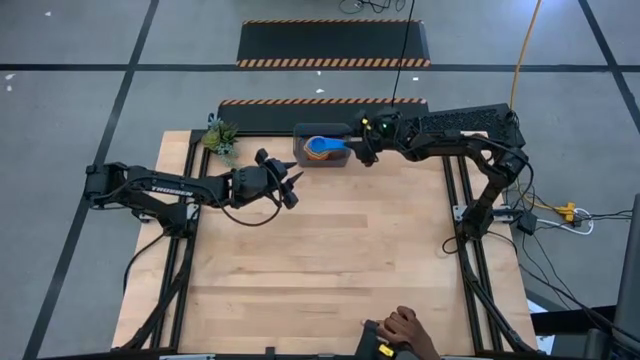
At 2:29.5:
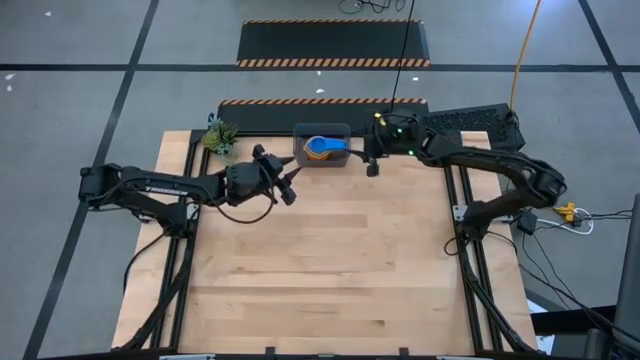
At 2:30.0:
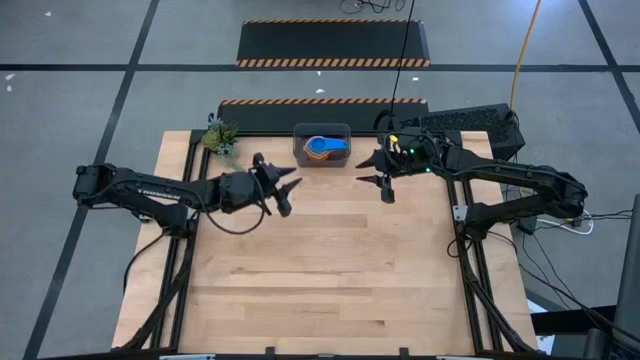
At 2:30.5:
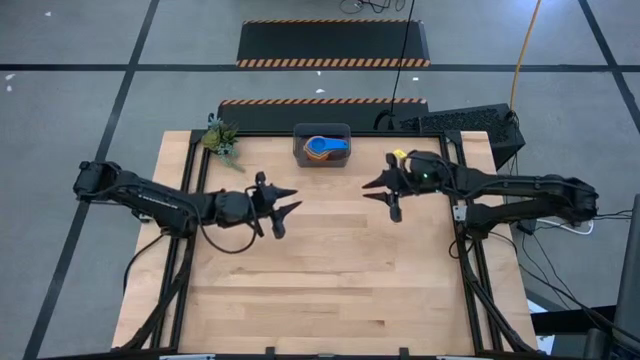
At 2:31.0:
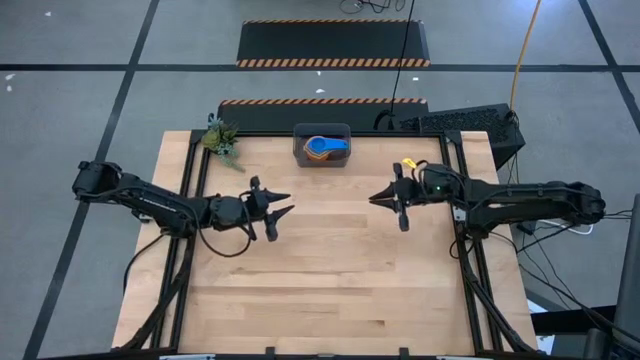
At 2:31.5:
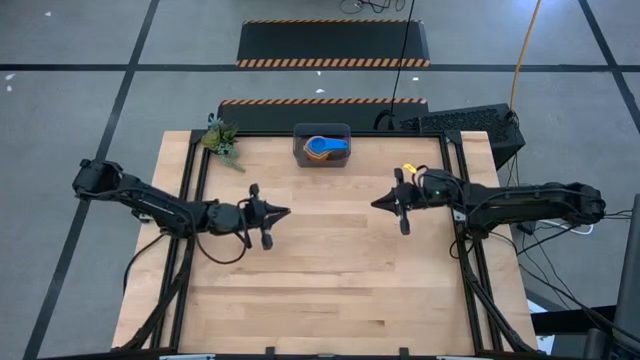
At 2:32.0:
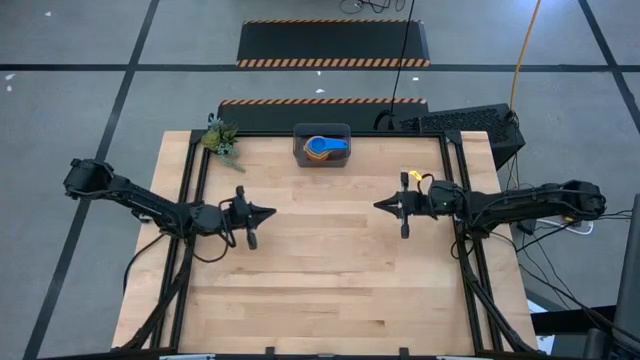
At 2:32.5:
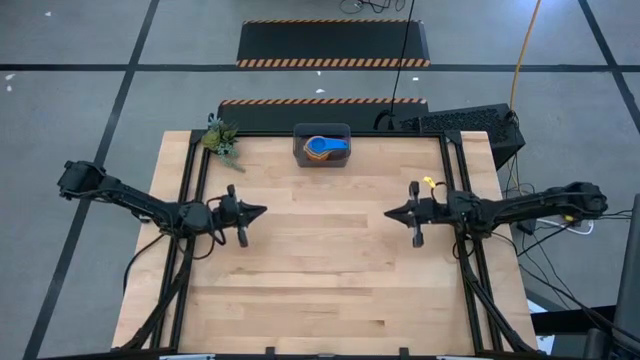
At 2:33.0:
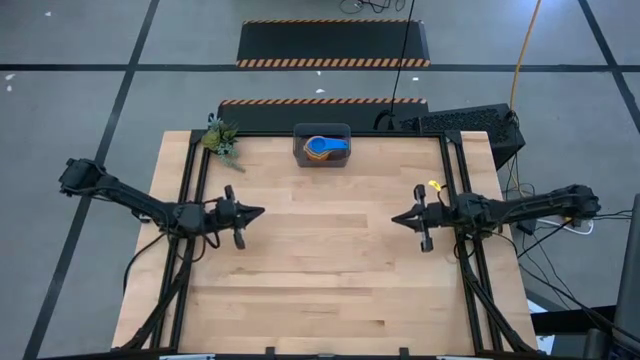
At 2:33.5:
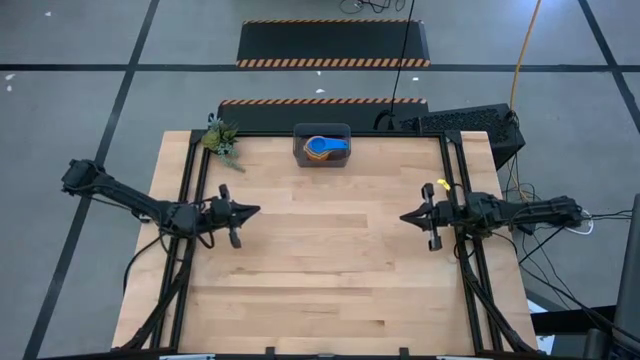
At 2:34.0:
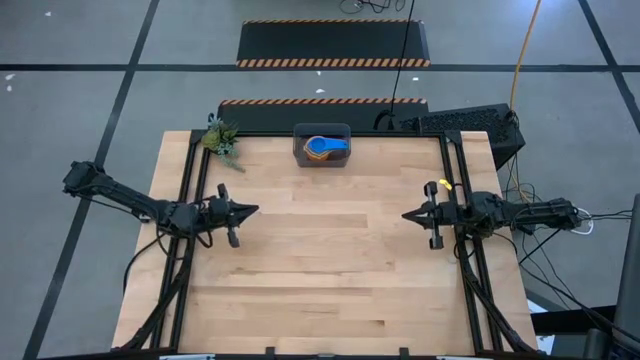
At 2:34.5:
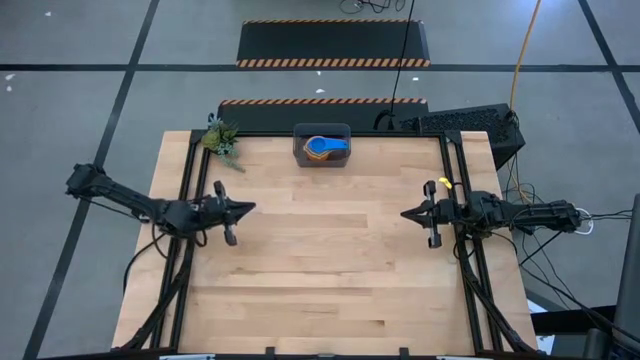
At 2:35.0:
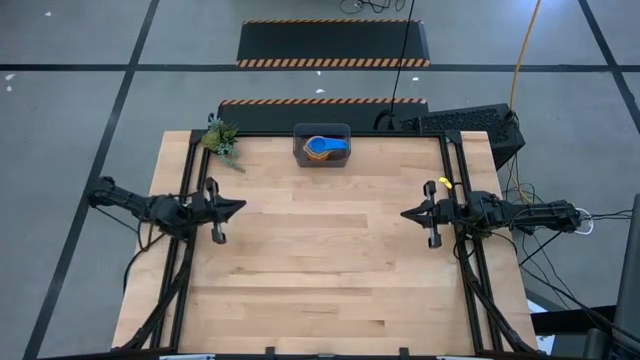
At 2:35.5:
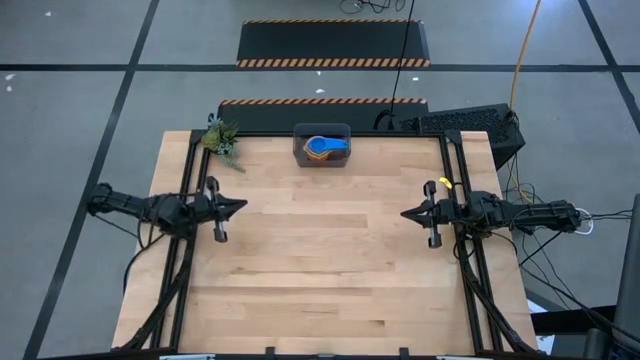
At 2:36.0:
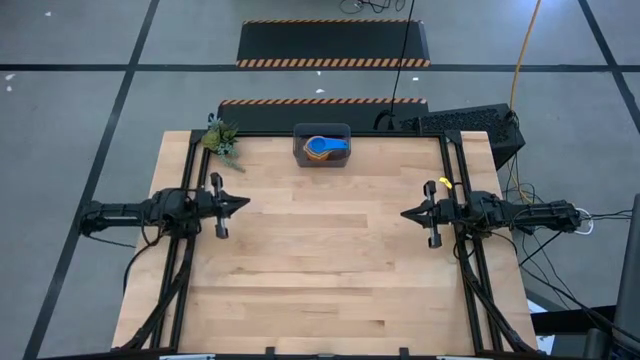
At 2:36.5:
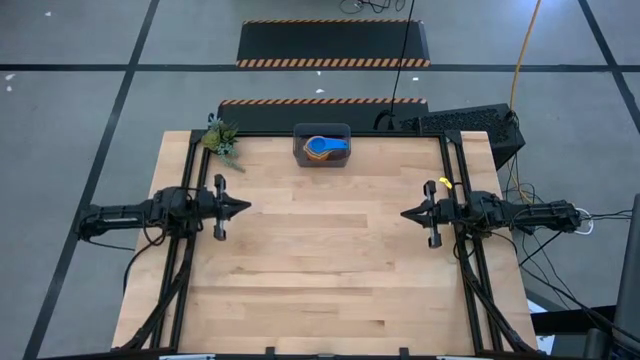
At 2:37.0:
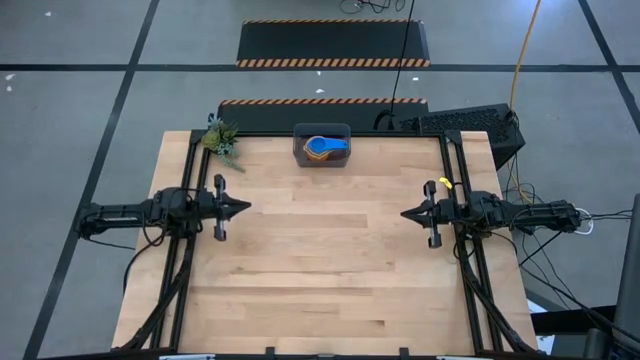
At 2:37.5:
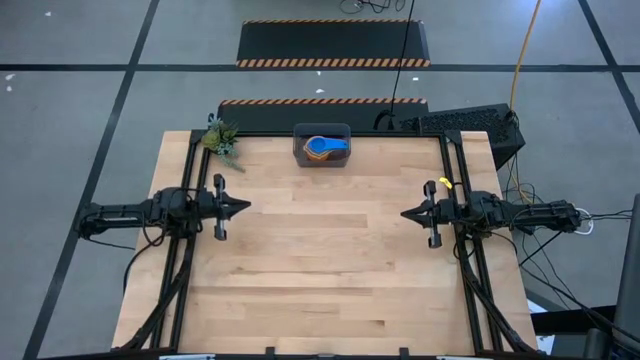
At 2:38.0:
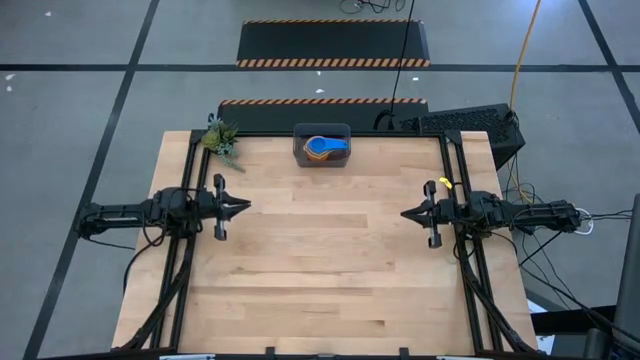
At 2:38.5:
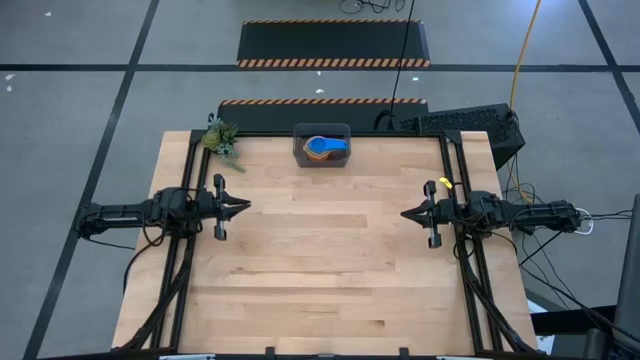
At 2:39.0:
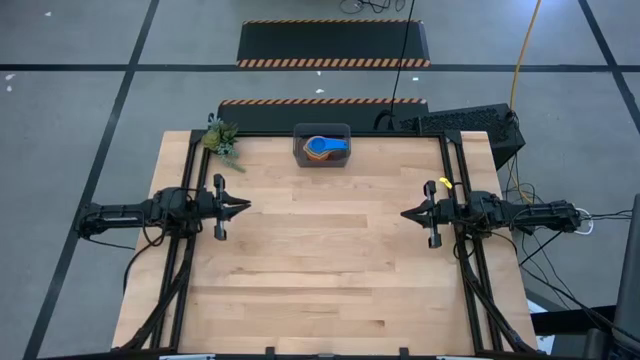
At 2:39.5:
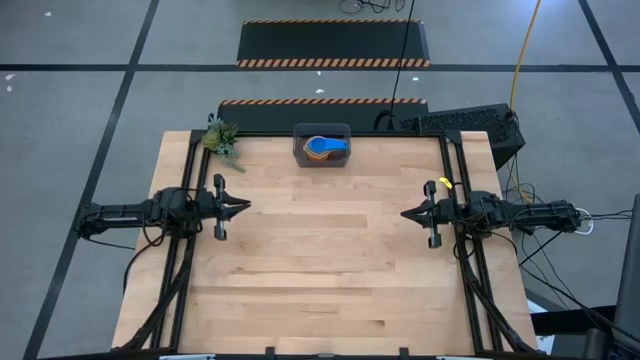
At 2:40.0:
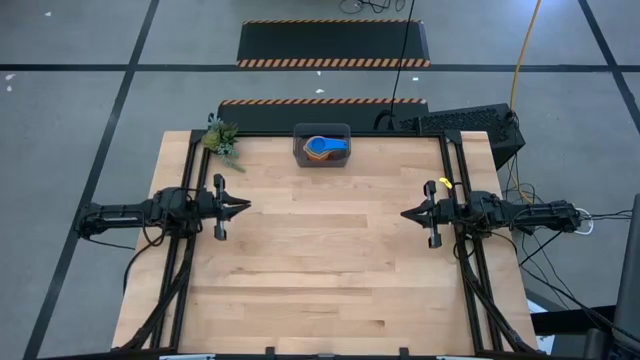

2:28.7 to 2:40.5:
Task: Nest measuring cups in basket
Return To Home Position

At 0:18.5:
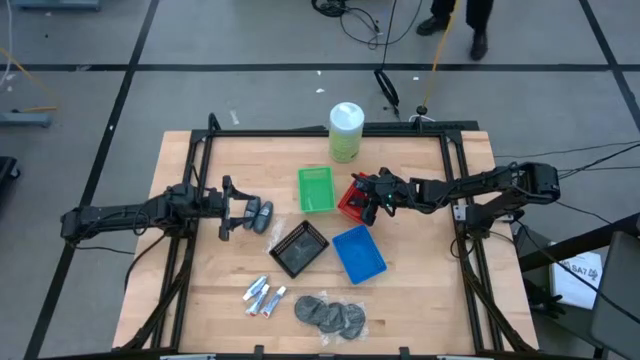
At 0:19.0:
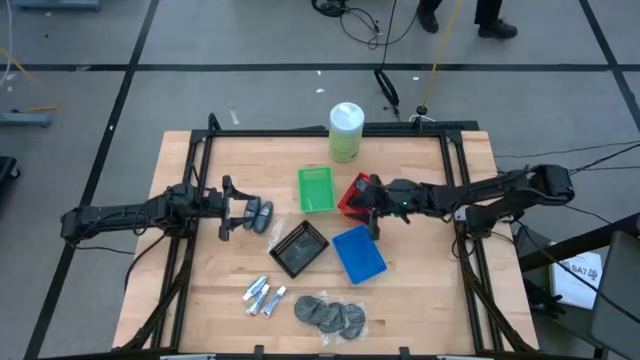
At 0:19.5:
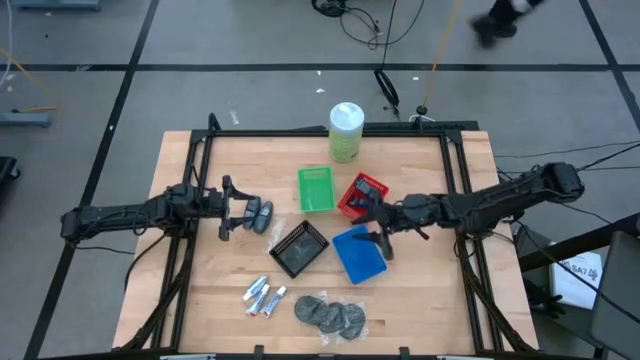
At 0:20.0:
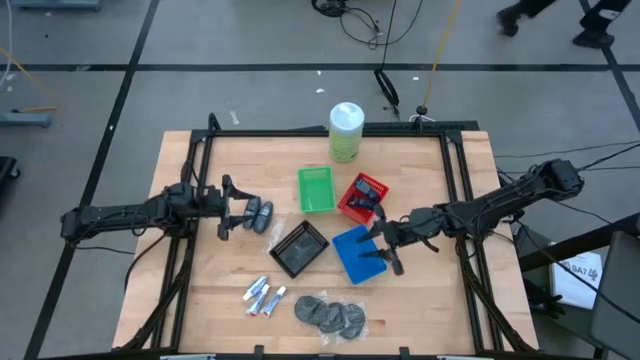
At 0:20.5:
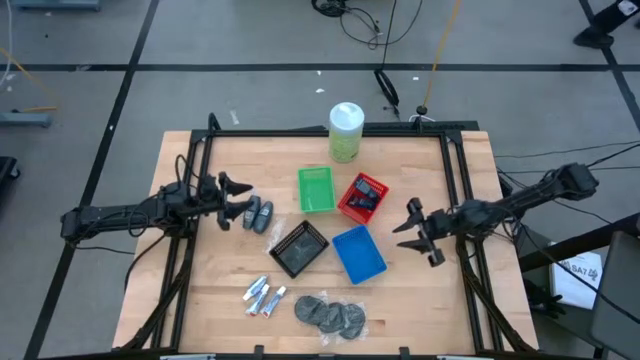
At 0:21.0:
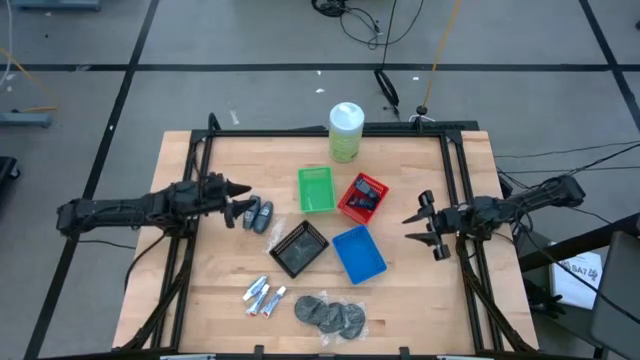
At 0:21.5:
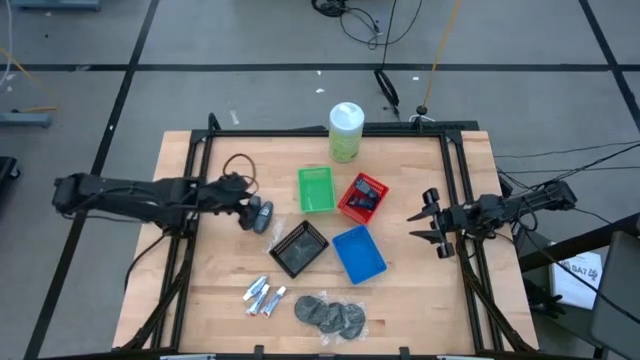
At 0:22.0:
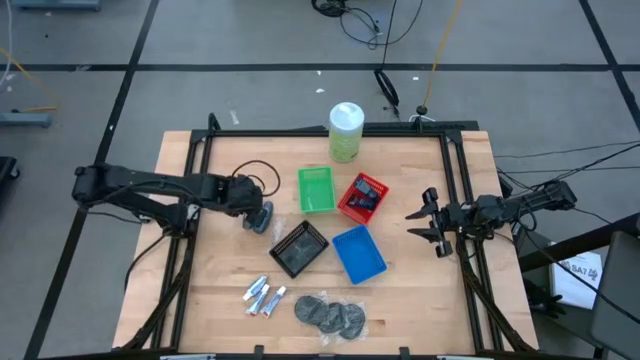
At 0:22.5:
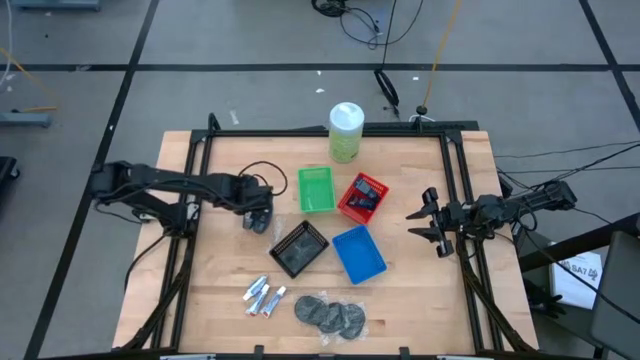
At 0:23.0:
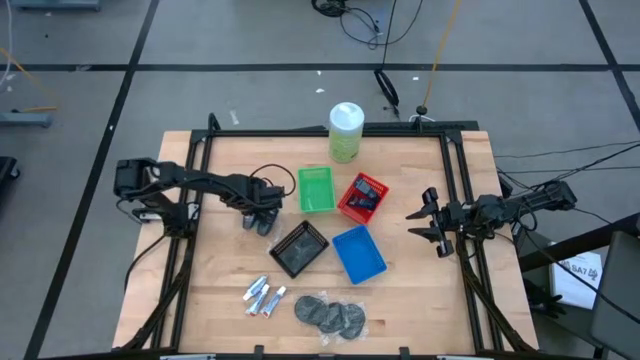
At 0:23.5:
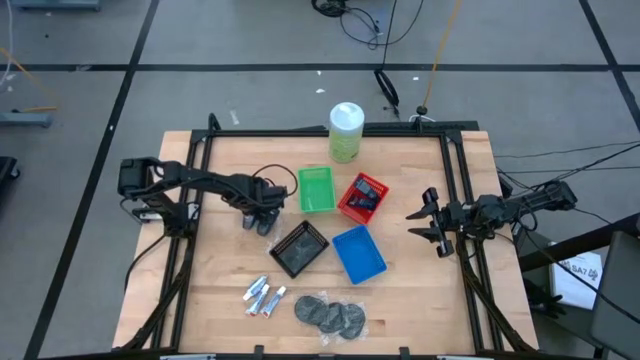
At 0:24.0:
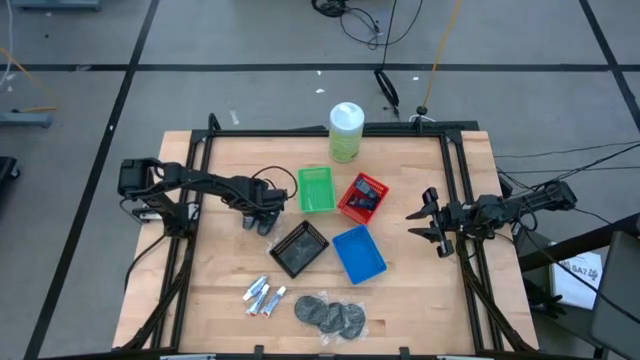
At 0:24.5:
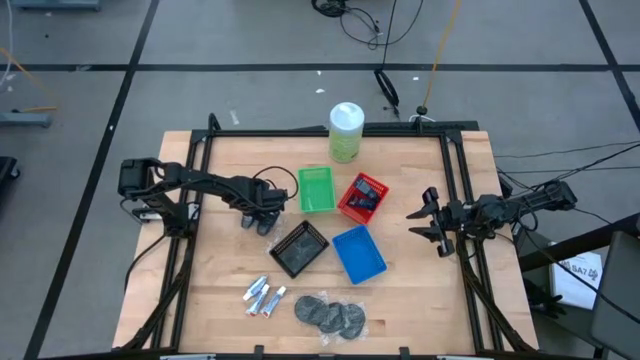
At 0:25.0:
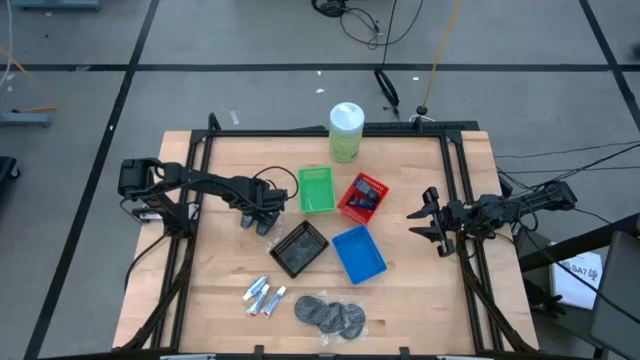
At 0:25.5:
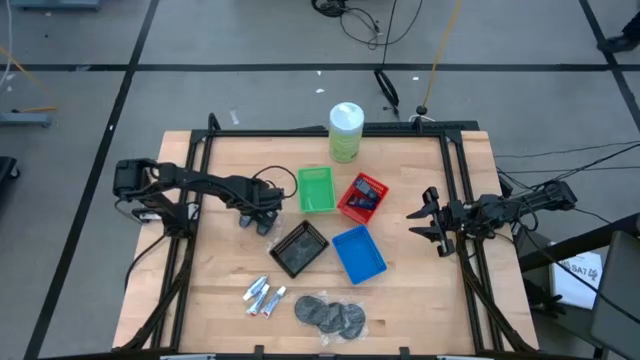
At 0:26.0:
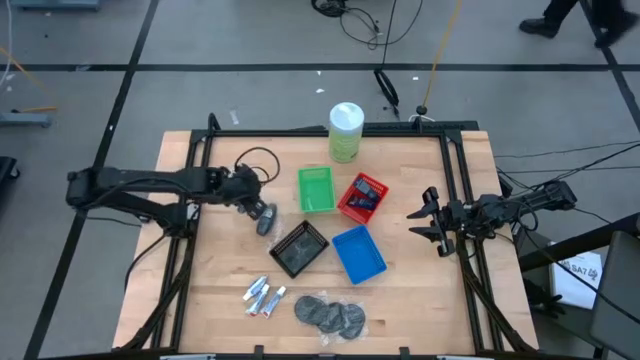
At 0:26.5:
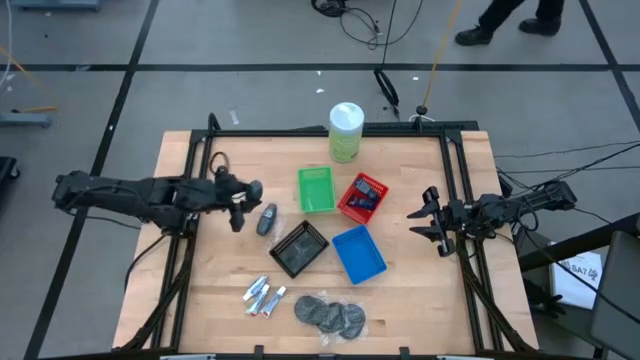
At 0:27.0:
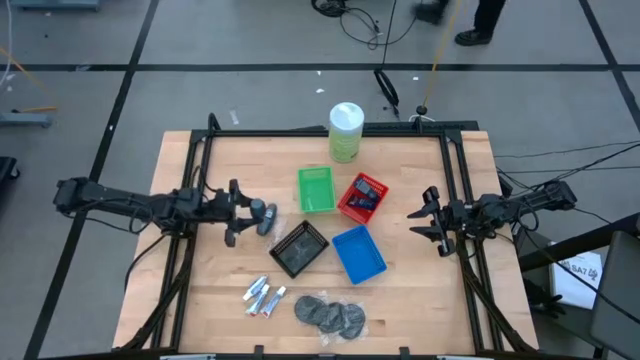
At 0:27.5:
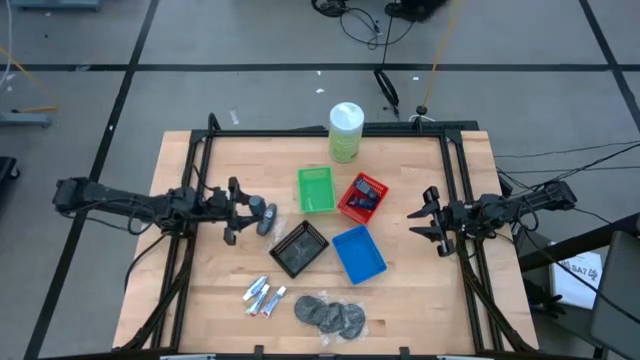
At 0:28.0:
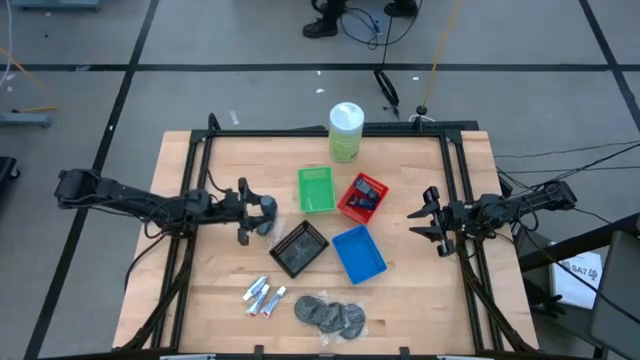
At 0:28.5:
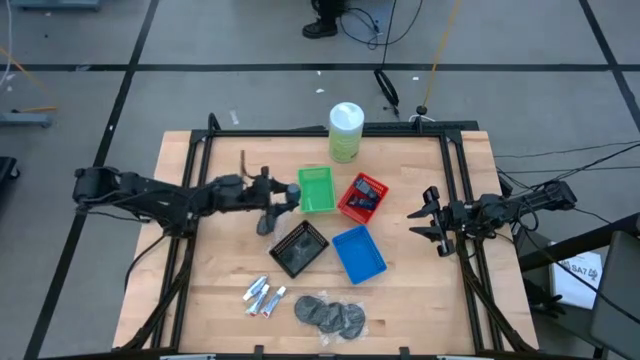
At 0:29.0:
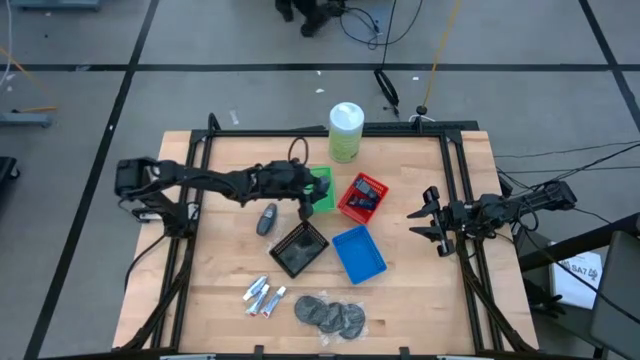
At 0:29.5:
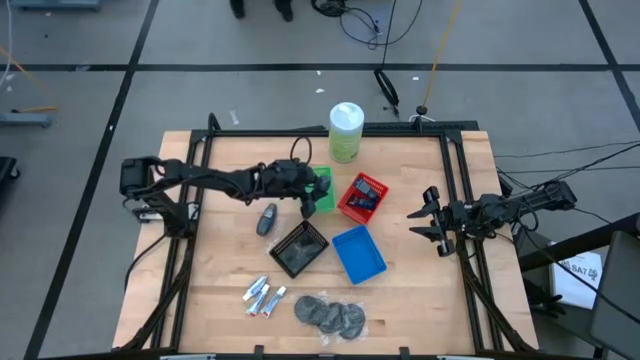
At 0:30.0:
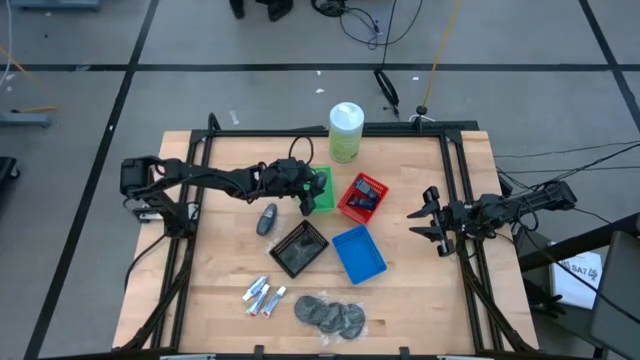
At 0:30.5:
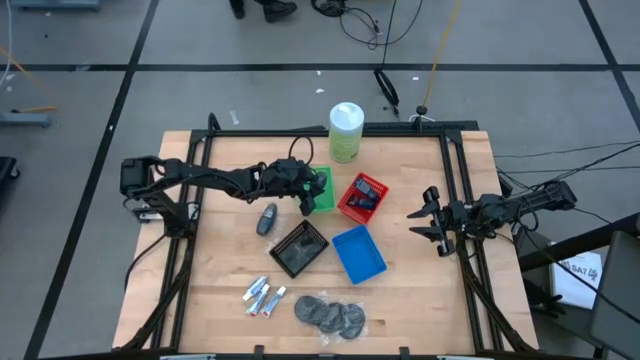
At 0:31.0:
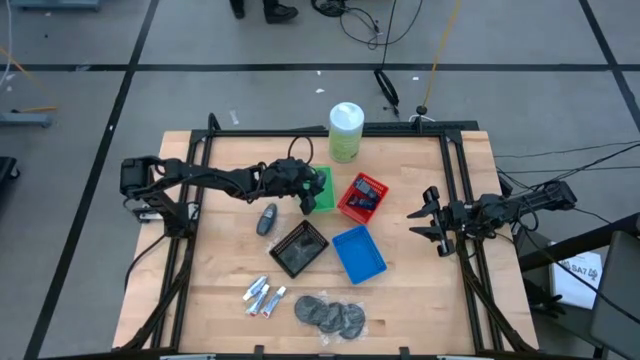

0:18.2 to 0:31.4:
Task: Pick & Place Travel size toiletries
Put the left black deodorant into the green bin
